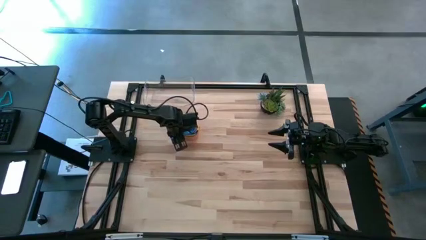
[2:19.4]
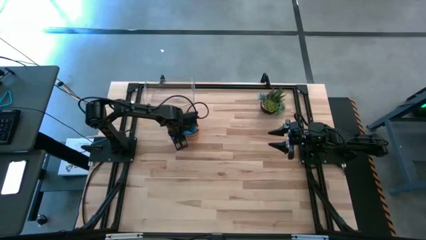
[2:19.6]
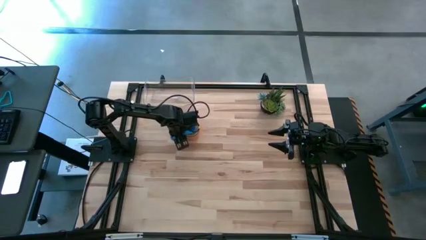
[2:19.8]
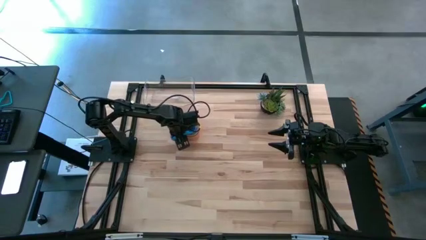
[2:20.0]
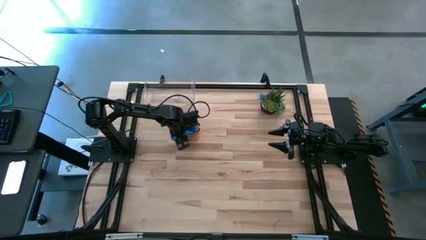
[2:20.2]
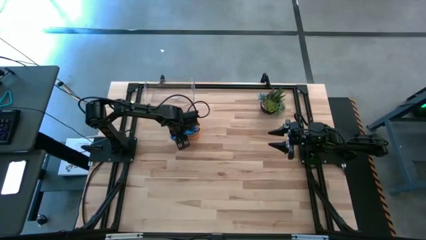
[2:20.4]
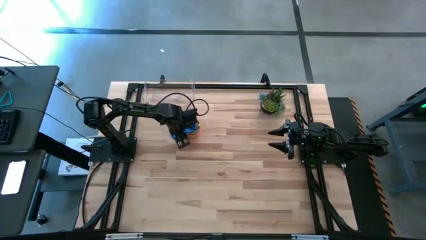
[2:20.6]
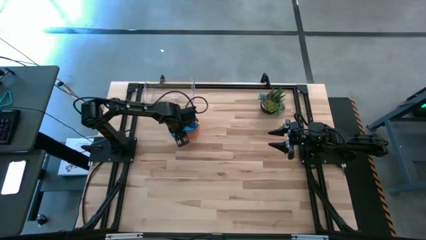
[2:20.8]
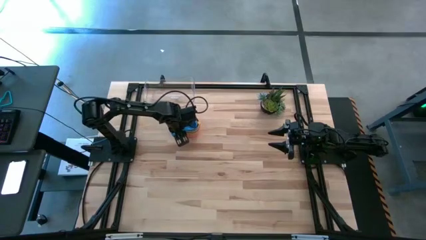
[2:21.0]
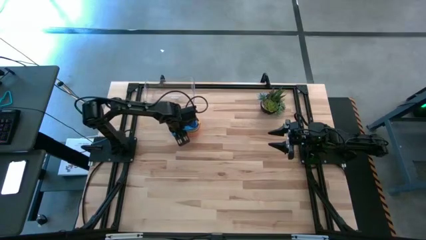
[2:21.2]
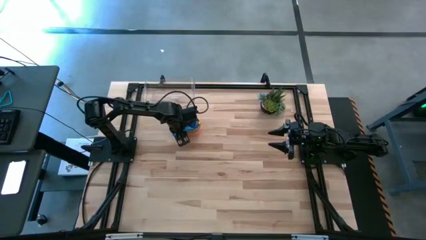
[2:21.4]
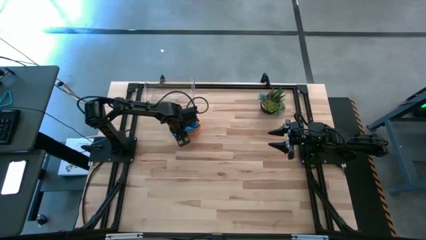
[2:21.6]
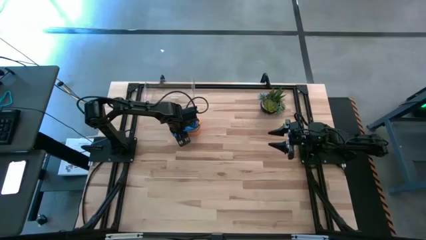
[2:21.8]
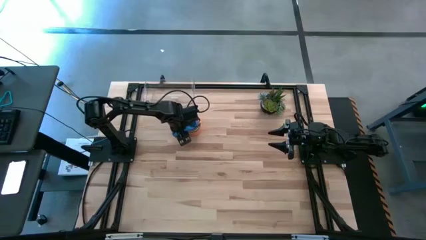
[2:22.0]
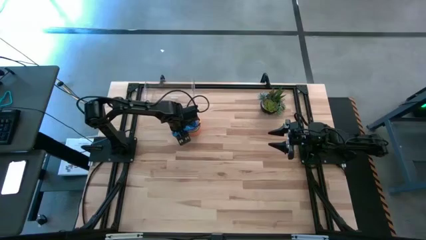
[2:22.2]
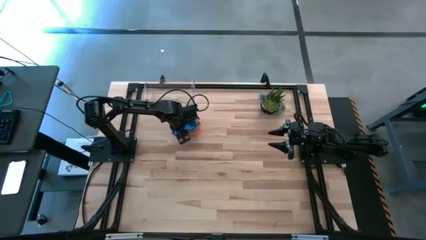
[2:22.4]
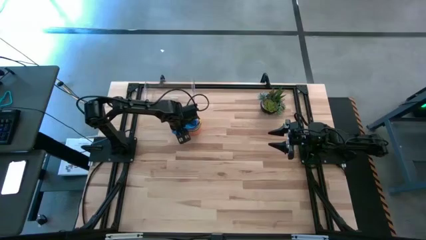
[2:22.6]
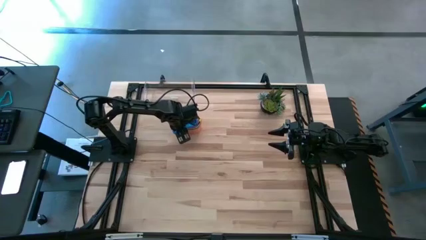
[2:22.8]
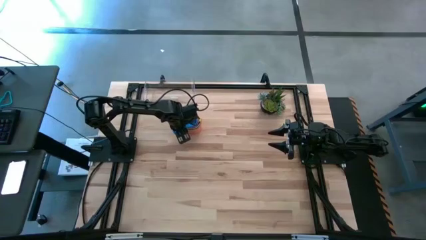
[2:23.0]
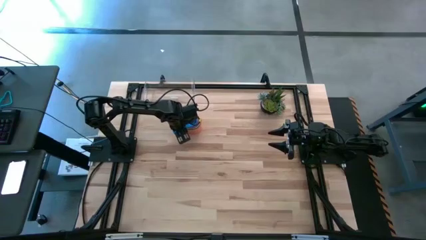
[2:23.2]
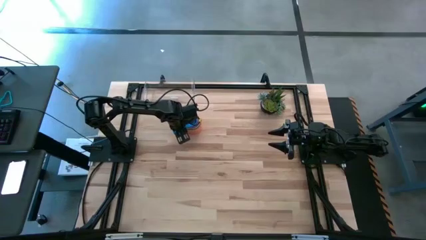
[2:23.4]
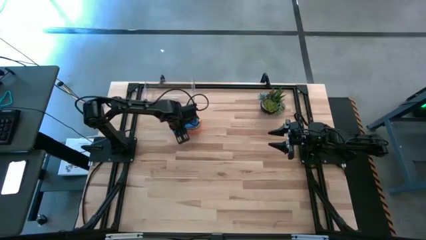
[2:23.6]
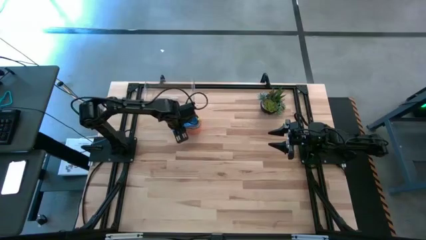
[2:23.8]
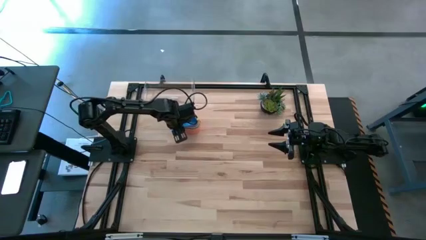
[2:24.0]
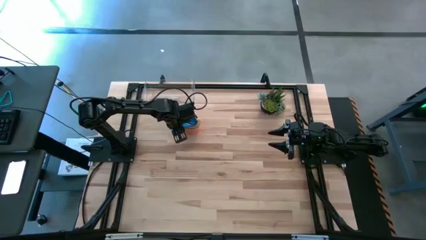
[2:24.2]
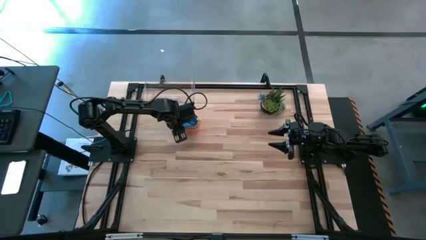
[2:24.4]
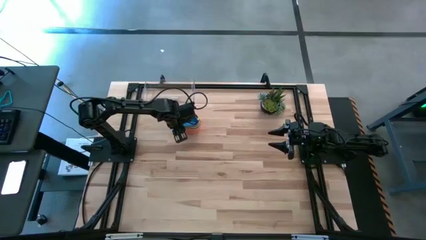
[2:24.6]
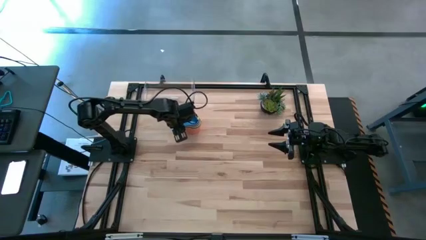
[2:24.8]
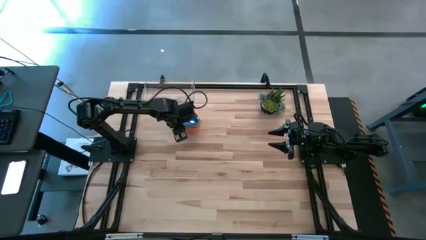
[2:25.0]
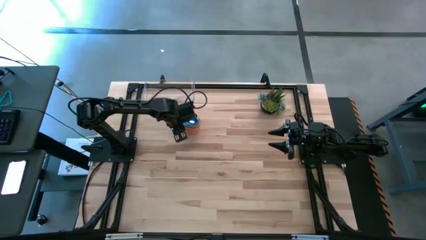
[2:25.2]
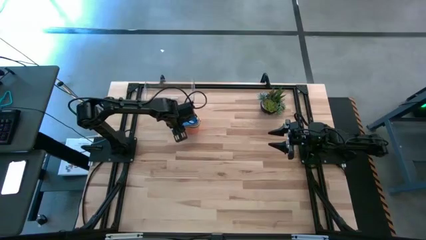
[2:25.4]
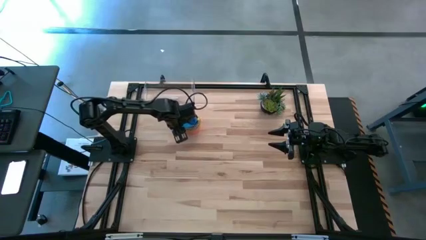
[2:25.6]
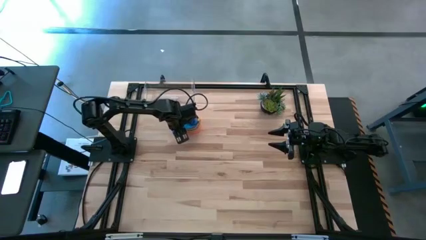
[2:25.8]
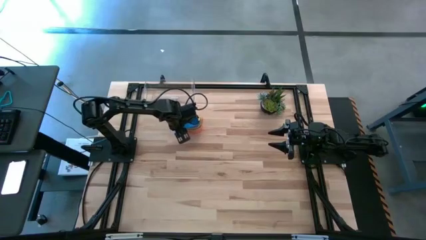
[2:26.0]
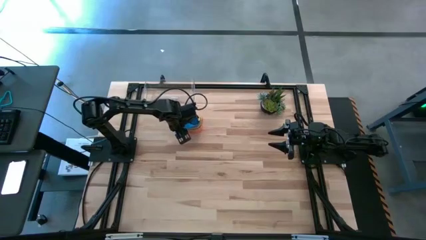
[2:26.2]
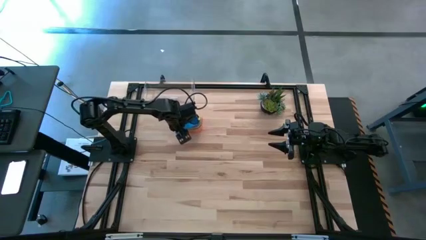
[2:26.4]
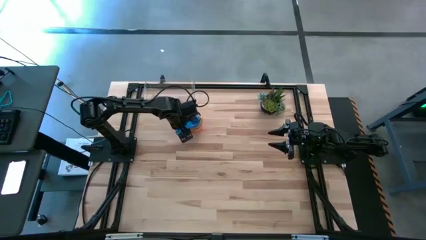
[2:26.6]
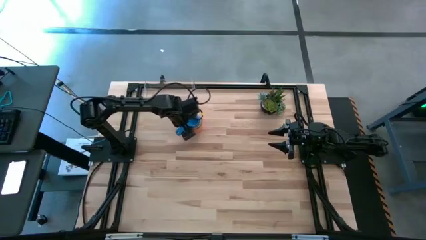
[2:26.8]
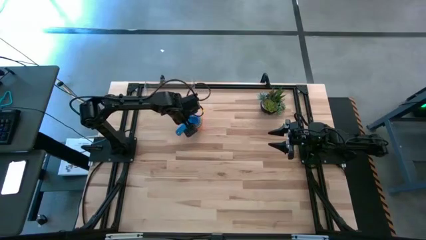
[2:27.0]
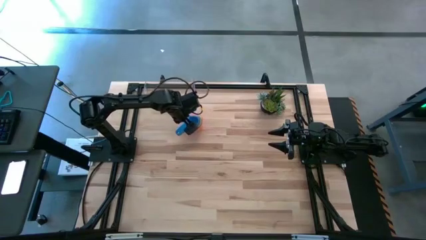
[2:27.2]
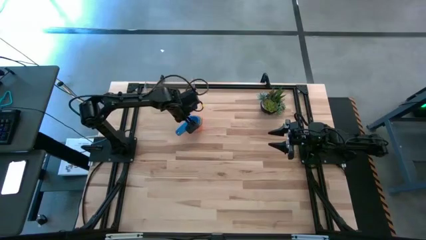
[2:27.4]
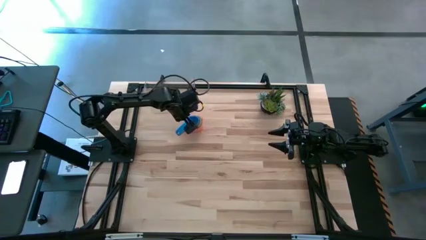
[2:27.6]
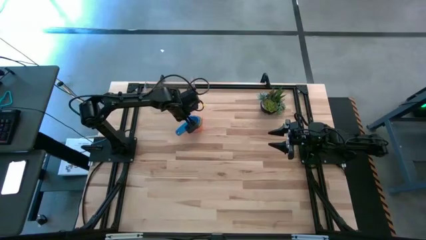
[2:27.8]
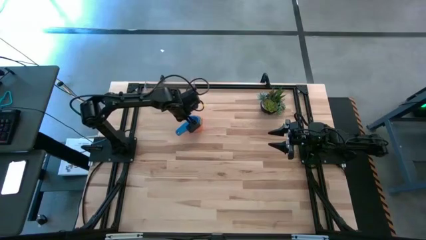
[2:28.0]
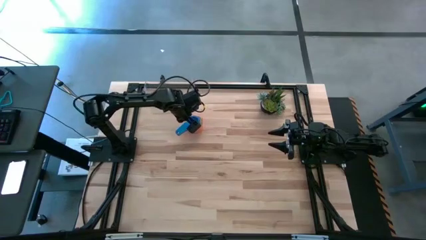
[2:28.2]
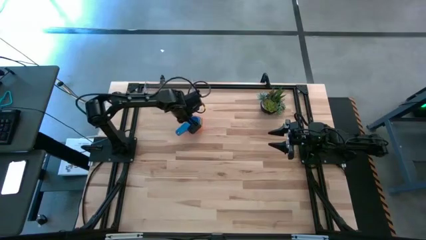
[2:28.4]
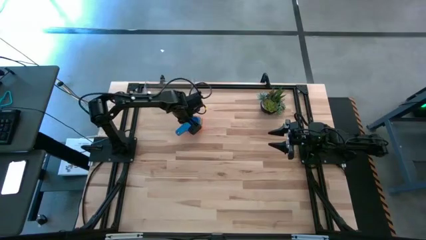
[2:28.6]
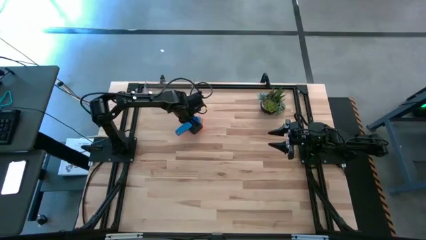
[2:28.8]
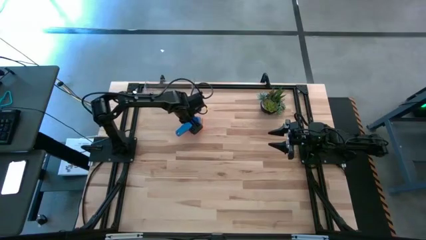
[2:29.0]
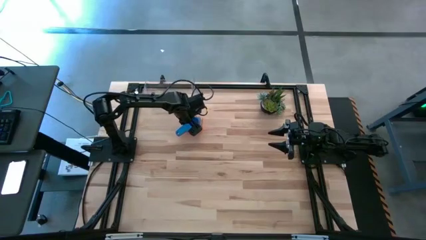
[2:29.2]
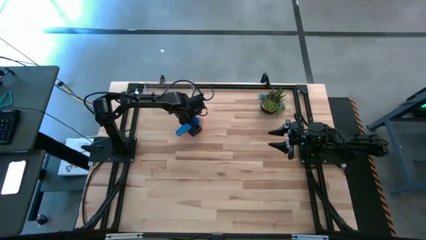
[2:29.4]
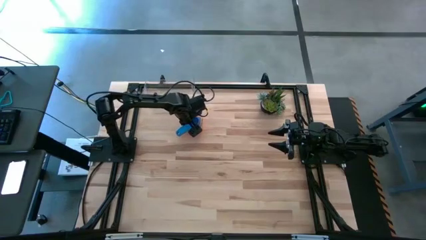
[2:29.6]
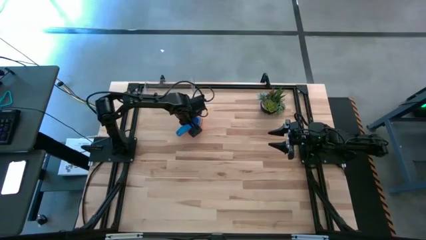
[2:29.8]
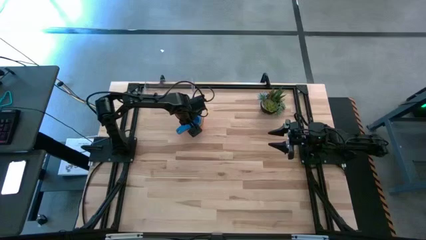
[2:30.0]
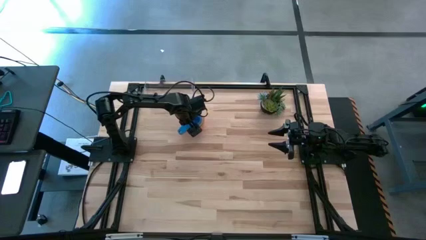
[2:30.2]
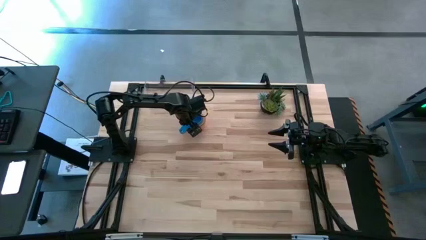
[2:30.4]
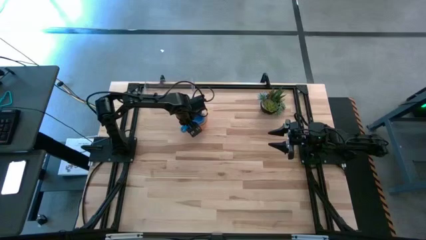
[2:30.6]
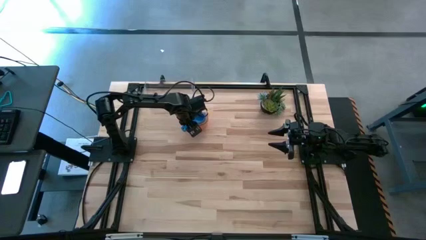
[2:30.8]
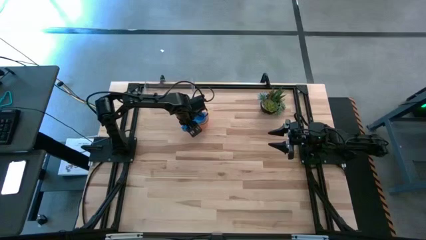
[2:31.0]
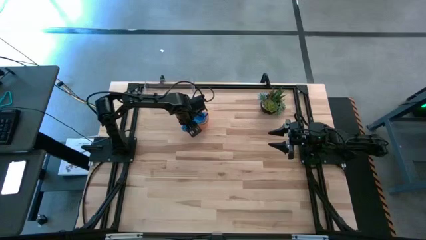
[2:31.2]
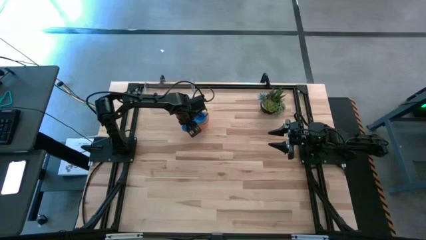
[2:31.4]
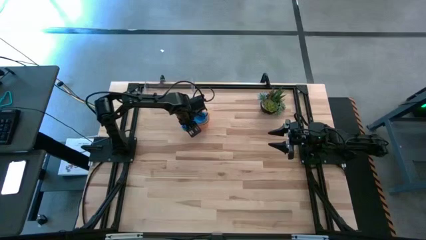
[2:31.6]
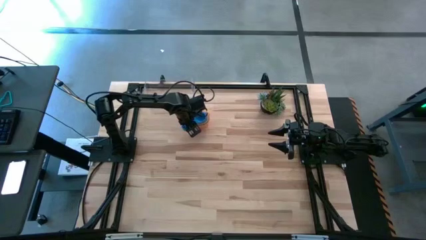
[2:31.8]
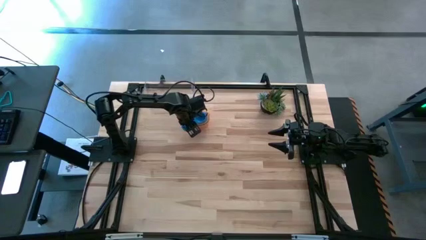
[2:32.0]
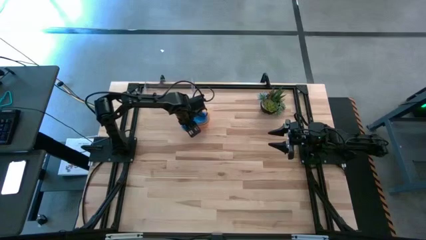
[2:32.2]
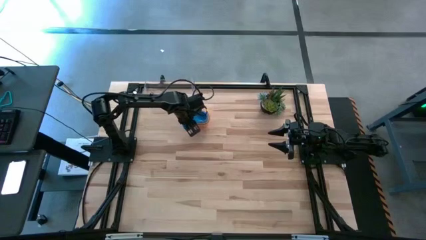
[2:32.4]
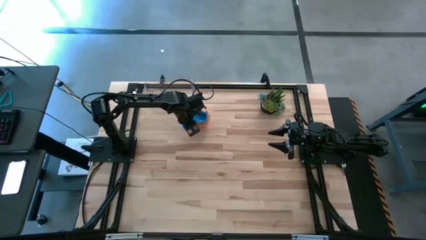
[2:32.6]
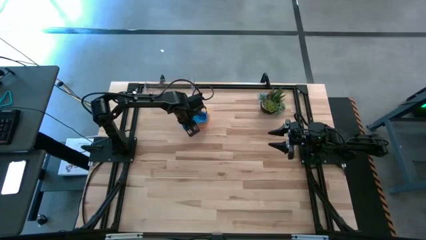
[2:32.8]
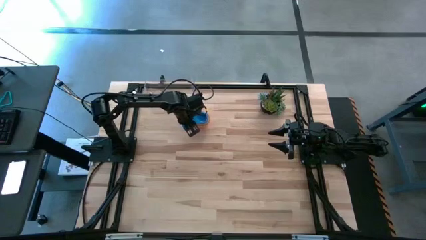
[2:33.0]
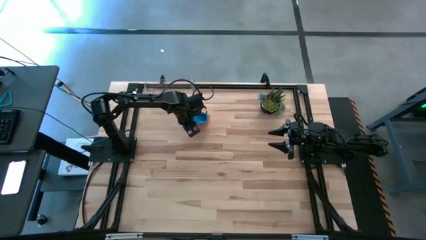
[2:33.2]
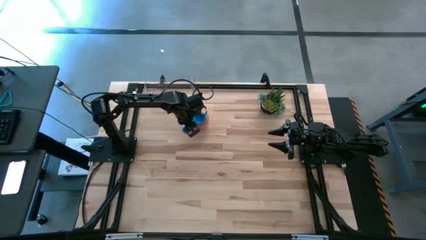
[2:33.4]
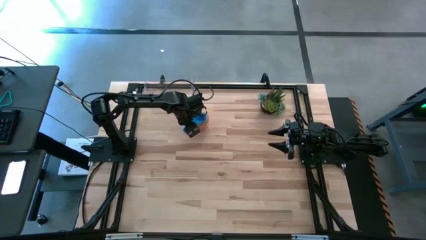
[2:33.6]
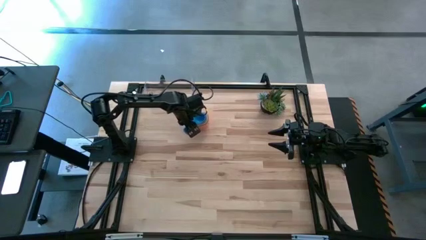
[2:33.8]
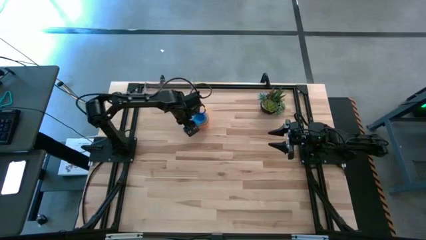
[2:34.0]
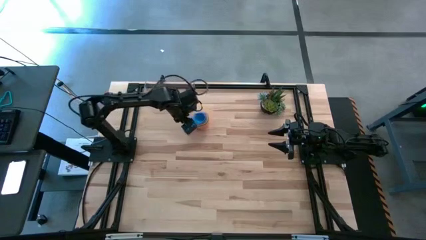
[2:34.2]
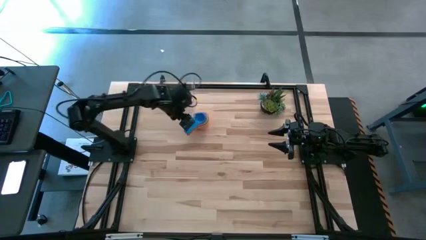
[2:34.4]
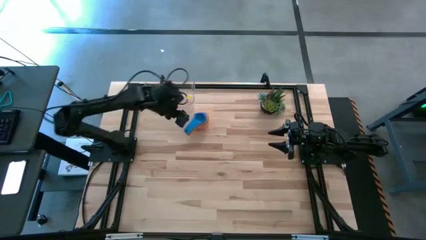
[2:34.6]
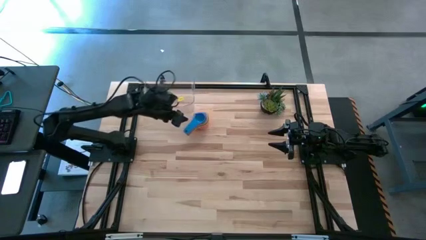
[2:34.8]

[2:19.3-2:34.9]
Task: Nest measuring cups in basket
Put the stacked colored measuring cups into the transparent bin
